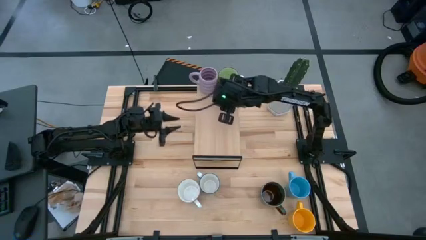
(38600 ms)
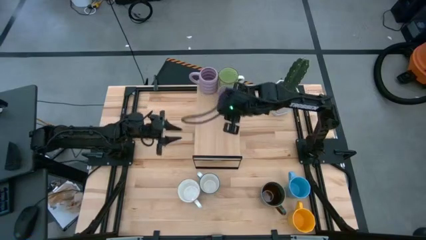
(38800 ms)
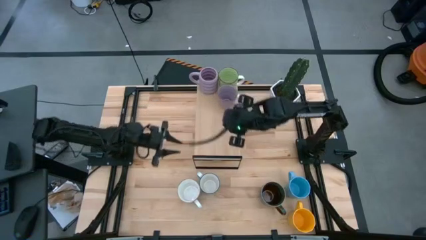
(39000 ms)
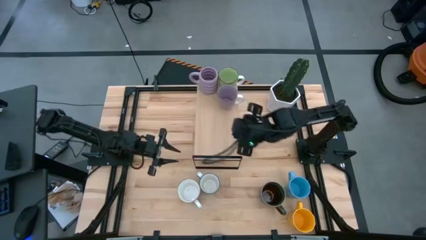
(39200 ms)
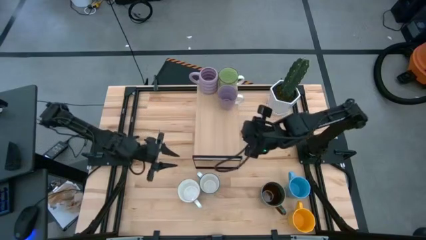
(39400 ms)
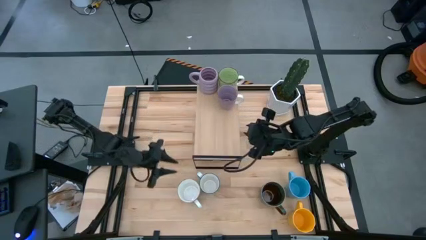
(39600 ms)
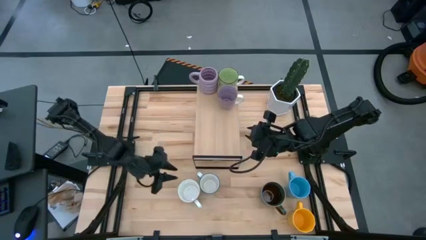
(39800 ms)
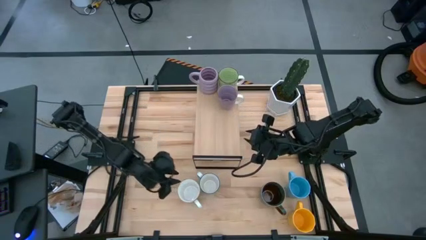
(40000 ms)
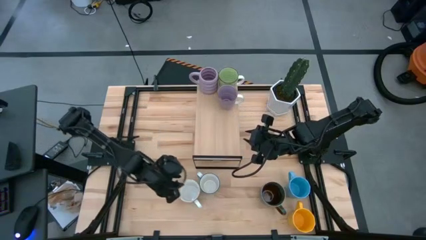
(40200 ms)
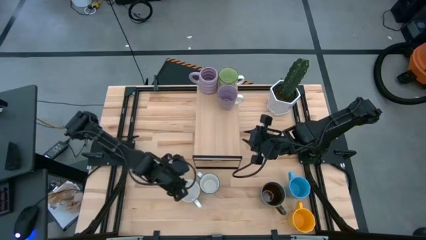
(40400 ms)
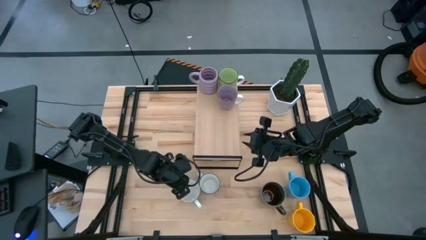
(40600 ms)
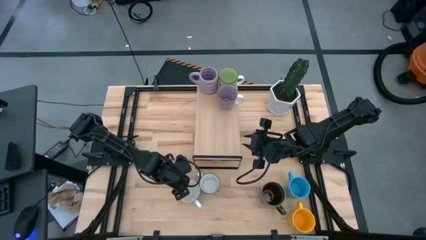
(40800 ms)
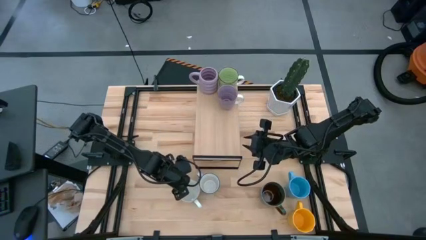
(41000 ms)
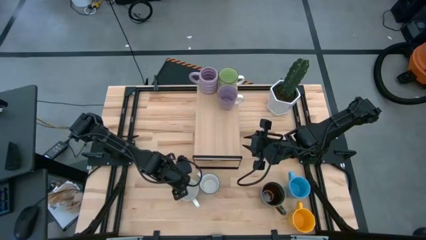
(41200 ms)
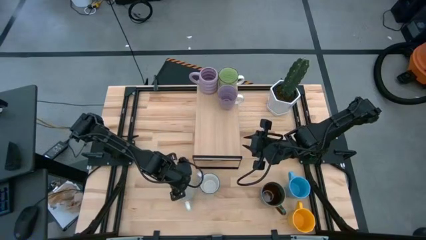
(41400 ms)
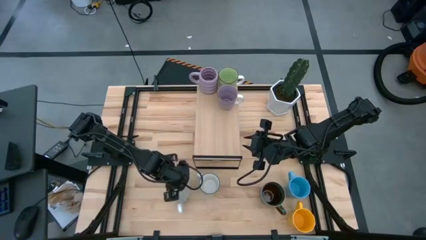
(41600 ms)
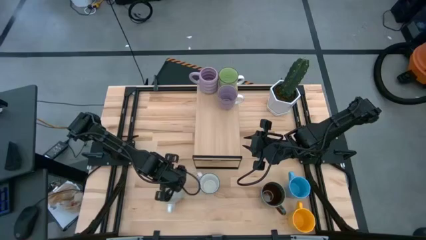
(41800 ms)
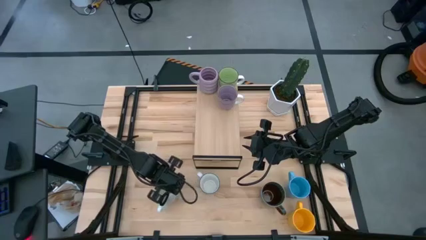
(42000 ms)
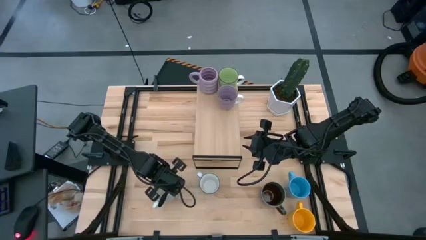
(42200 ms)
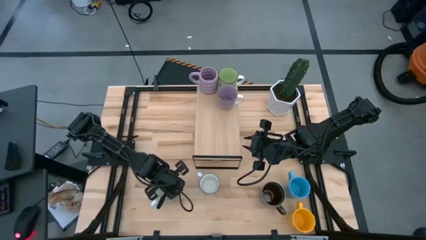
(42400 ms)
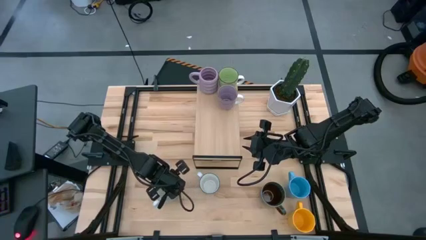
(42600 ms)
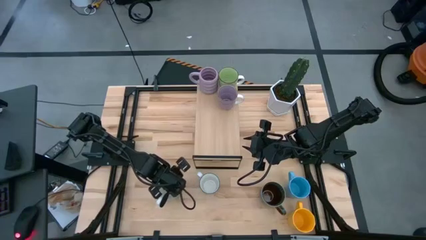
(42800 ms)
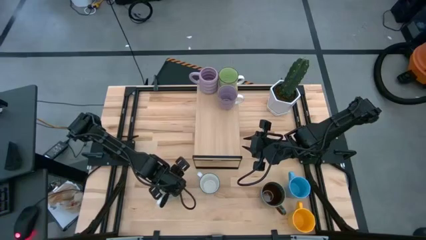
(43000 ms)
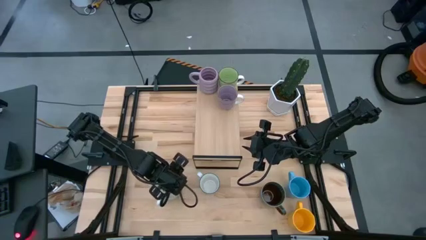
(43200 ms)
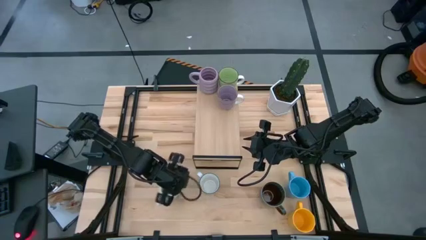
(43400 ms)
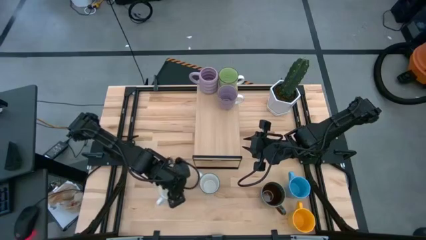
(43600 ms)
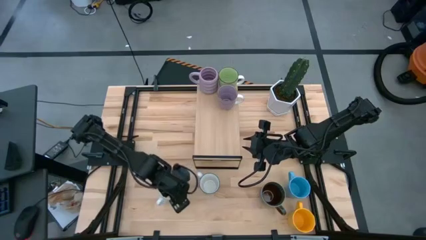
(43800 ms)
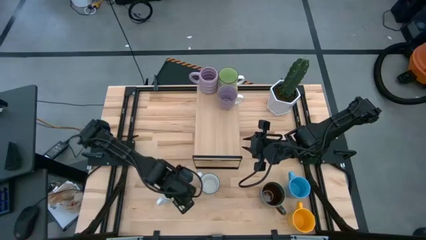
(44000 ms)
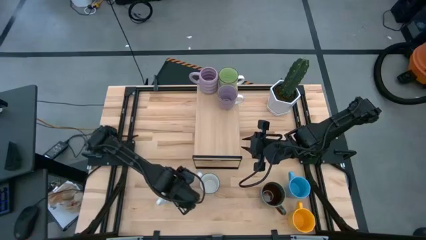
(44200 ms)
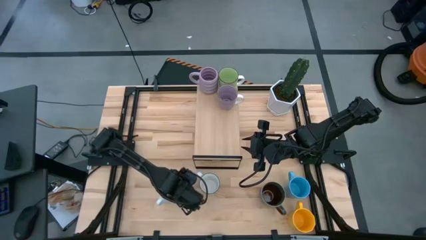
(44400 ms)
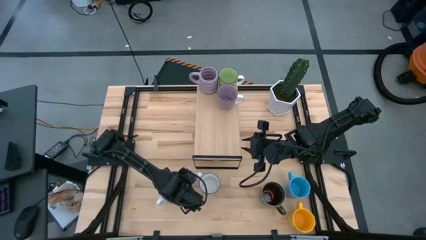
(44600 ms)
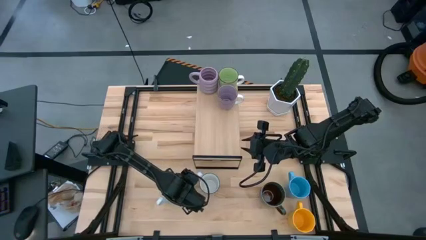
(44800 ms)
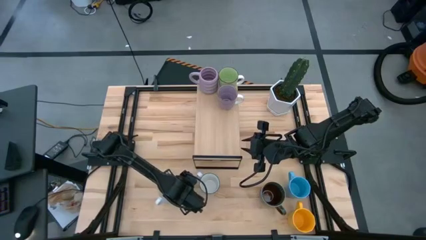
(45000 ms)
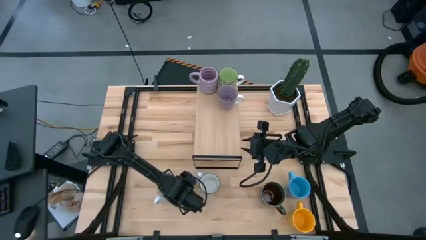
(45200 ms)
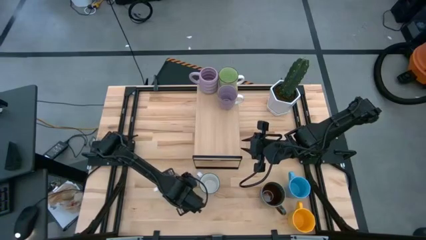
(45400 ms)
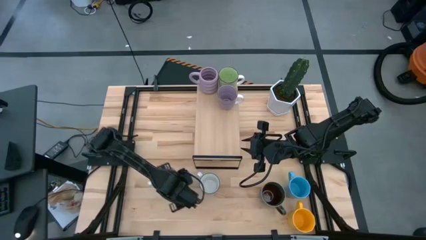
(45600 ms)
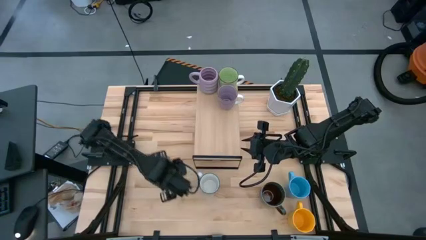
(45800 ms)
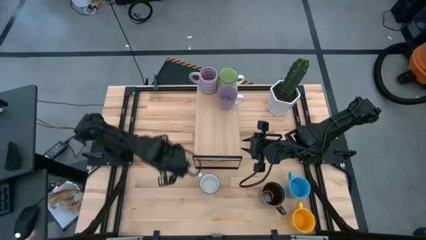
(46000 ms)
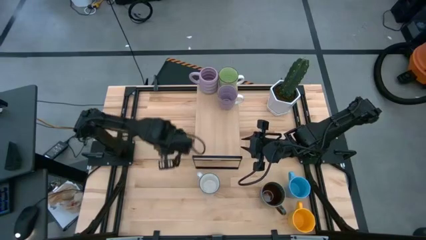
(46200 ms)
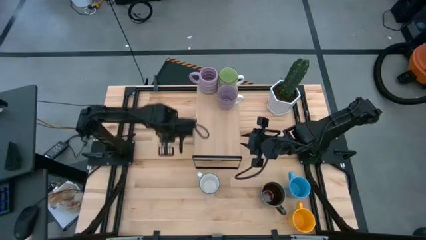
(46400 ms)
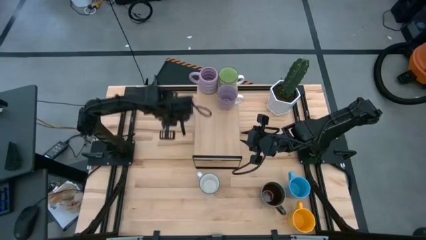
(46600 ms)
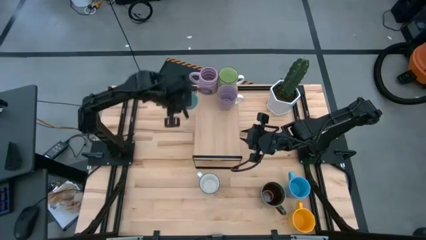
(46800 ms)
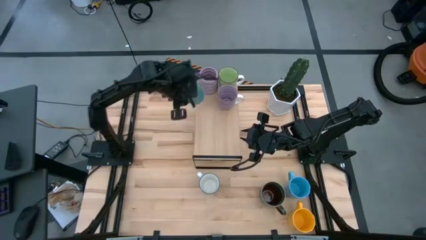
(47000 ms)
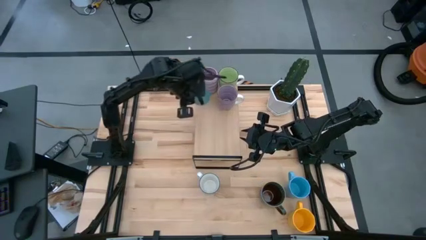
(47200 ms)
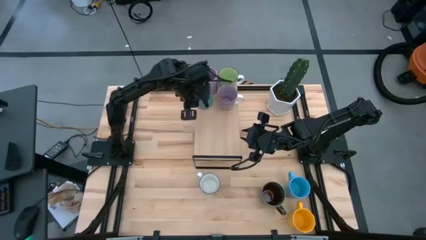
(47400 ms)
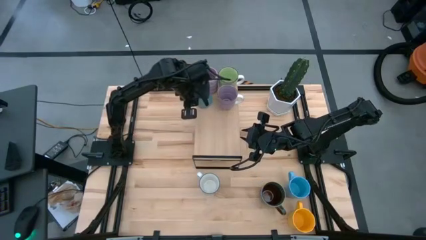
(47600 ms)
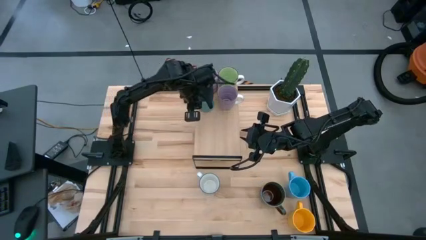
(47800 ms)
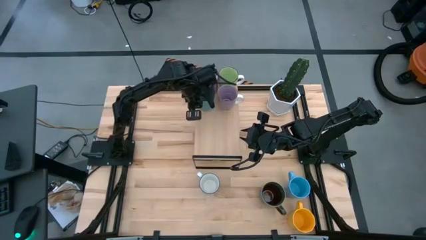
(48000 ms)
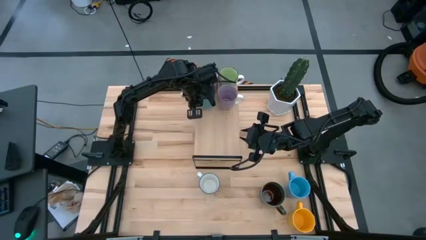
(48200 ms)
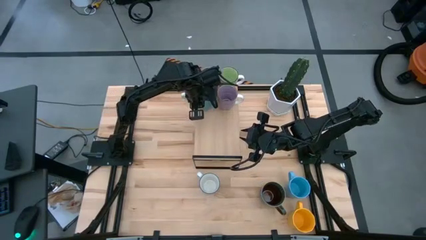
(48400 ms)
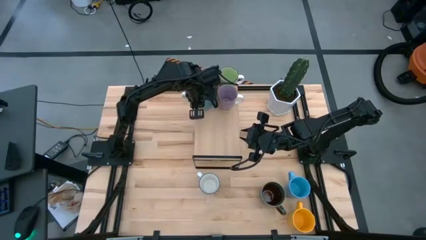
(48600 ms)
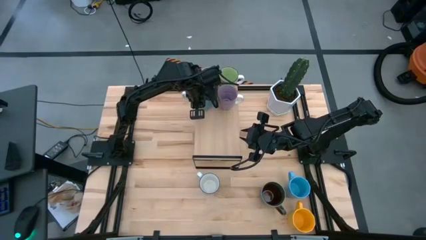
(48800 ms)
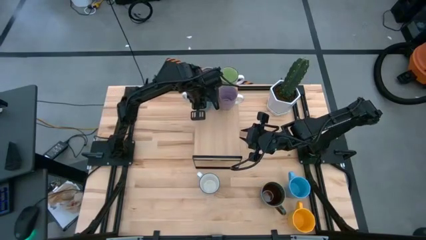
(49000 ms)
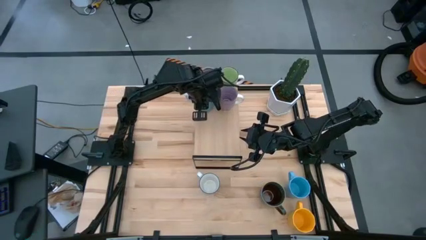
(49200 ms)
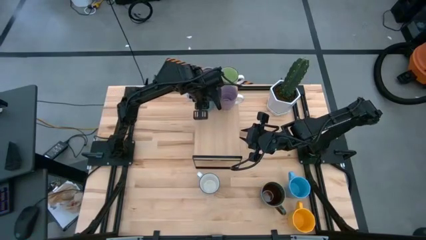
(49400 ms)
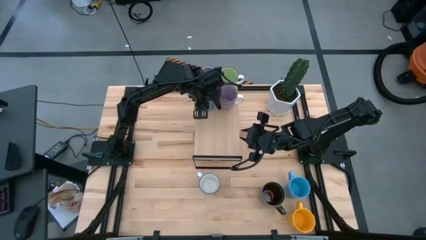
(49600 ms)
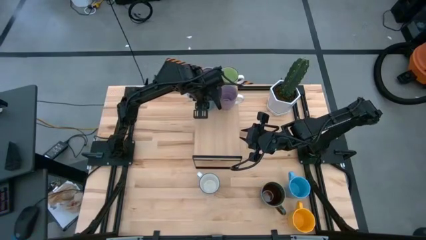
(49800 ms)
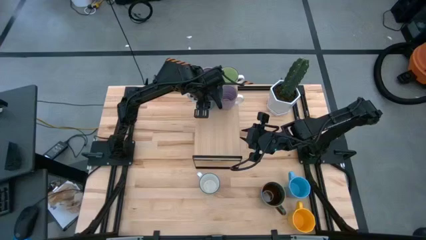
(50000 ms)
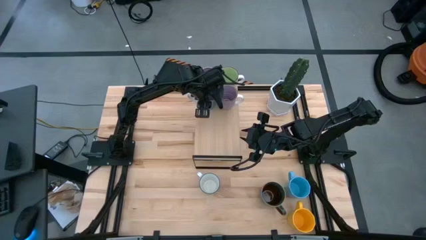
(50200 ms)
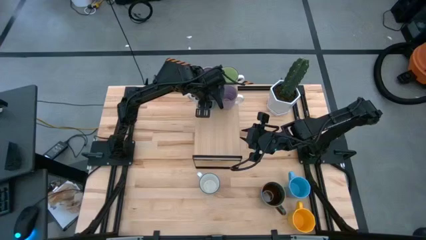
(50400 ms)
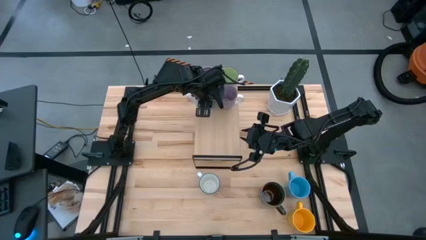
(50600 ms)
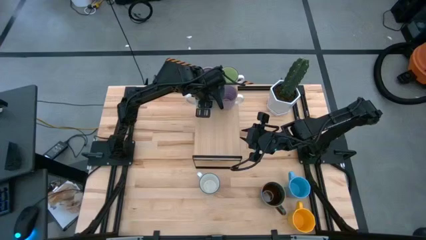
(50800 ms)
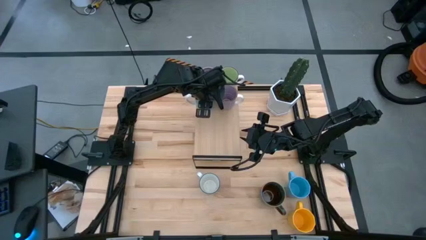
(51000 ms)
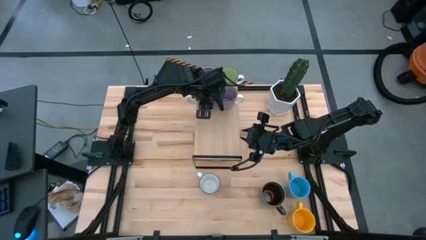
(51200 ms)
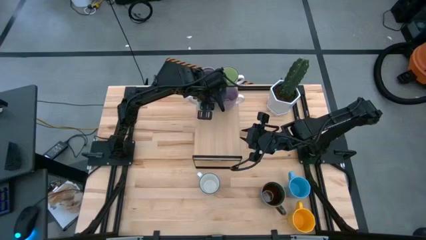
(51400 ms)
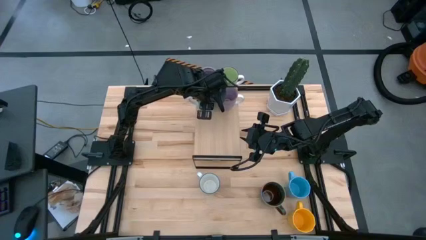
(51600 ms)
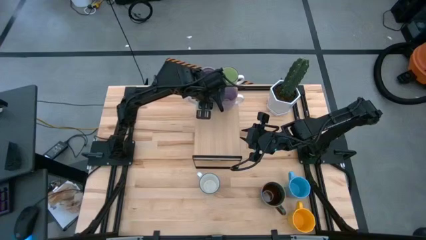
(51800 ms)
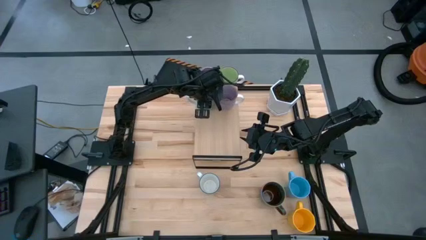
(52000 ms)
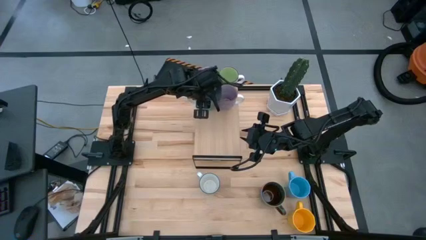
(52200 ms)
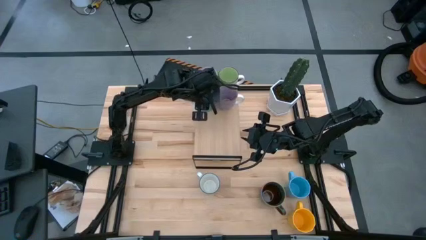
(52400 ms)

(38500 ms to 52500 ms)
Task: Place coffee mugs
Put the blue-green mug on the shelf

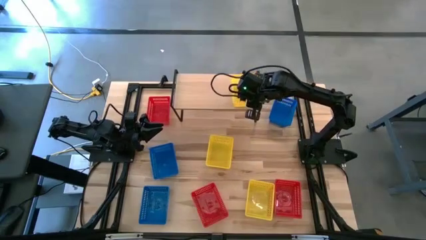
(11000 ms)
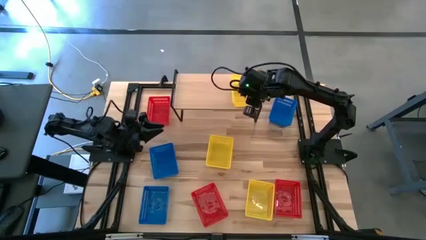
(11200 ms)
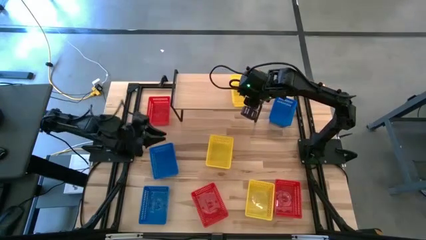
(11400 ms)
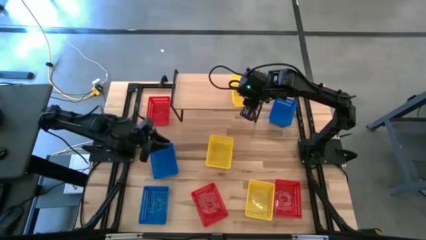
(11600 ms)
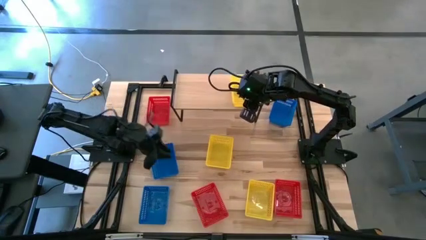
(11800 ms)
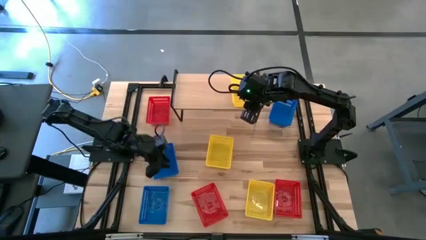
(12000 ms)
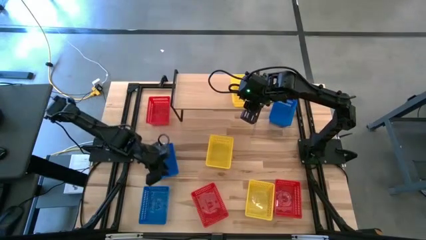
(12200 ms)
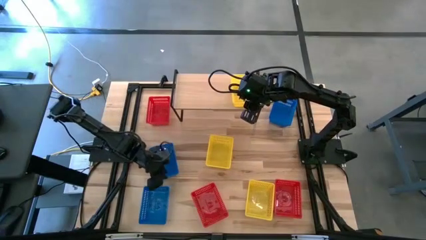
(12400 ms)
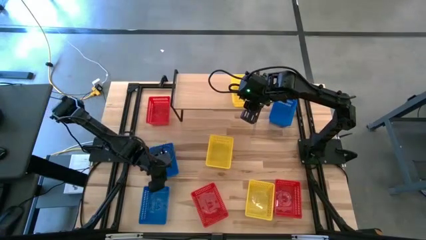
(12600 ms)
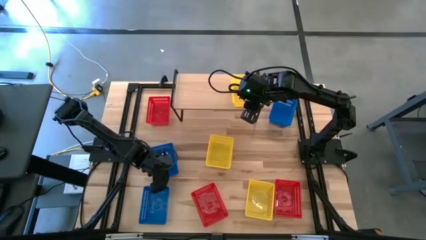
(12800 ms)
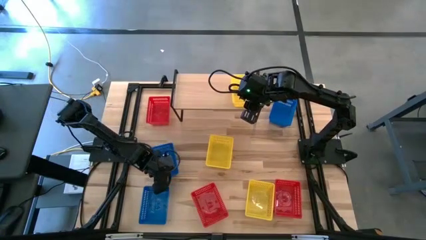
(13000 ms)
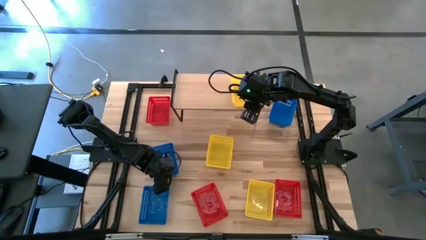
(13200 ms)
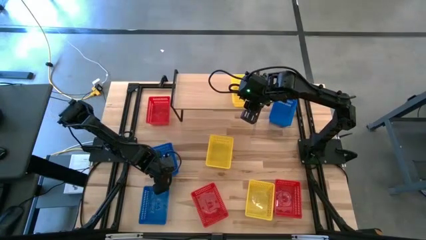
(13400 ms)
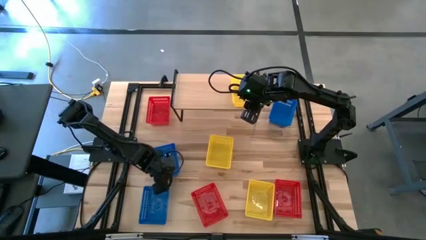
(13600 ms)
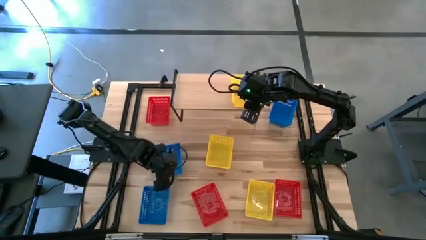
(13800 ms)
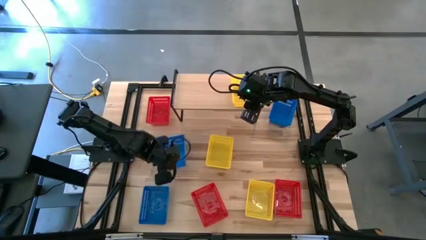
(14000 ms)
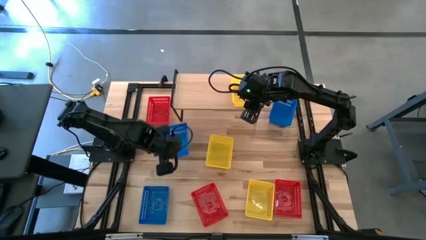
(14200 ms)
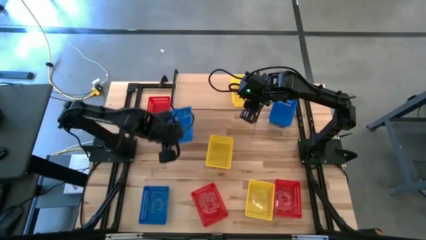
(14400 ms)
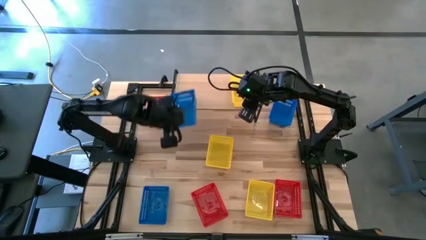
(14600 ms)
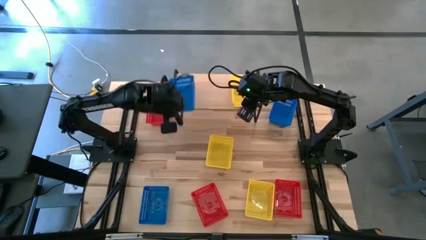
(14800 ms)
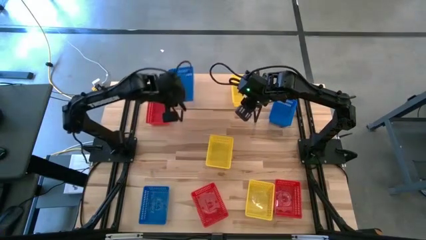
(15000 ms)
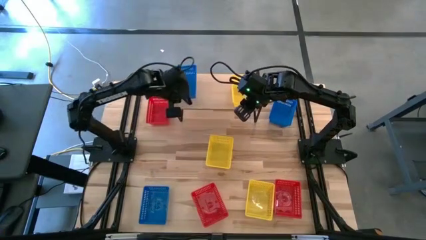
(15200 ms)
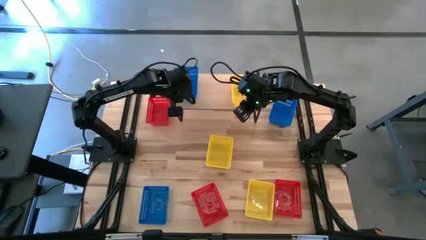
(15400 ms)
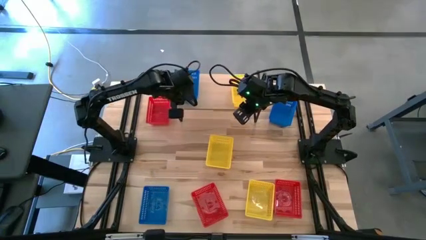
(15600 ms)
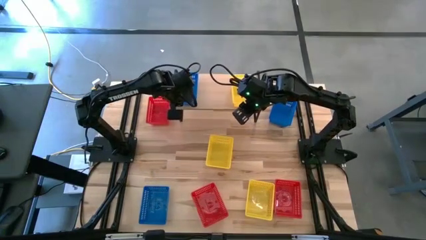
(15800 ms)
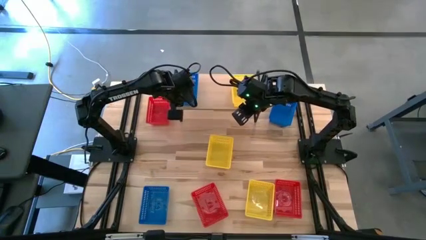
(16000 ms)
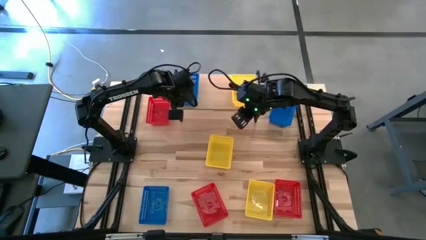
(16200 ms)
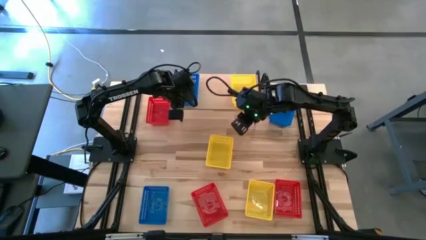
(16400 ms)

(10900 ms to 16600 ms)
Task: Stack baskets on shelf by color
Put the middle blue basket on the shelf
